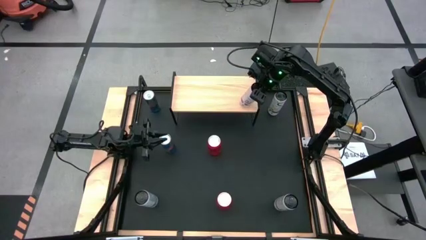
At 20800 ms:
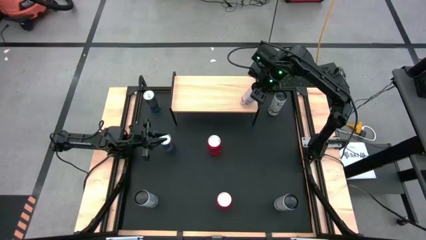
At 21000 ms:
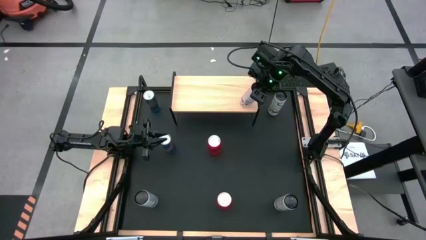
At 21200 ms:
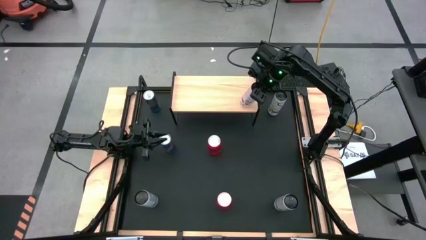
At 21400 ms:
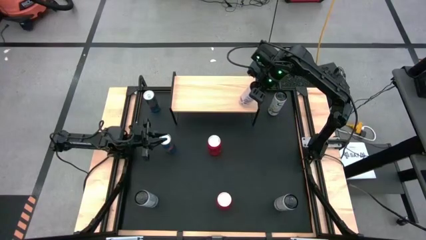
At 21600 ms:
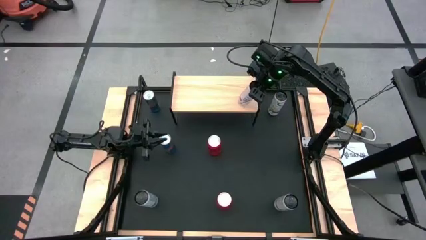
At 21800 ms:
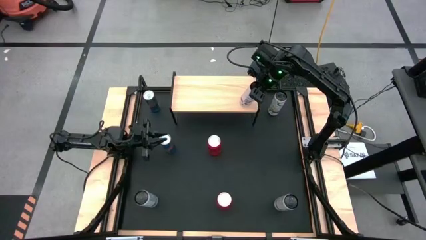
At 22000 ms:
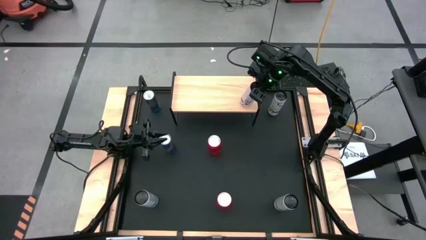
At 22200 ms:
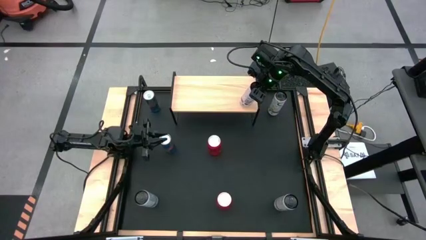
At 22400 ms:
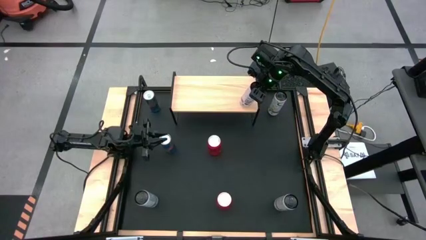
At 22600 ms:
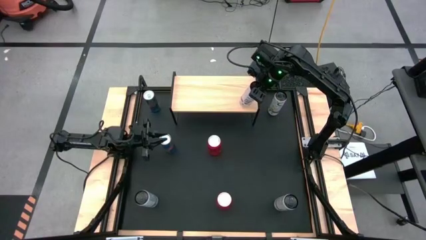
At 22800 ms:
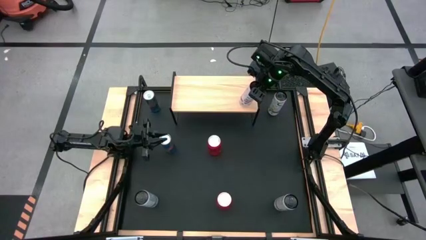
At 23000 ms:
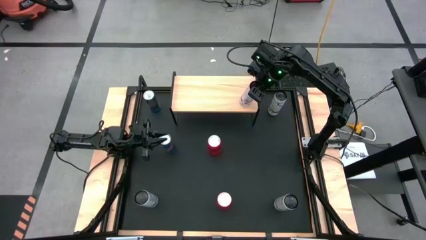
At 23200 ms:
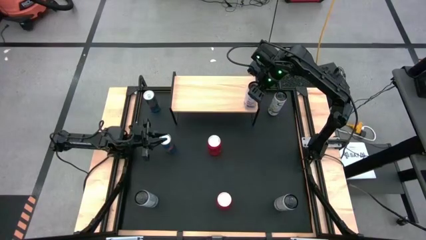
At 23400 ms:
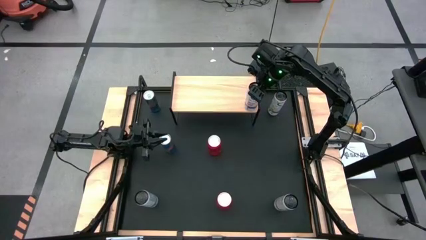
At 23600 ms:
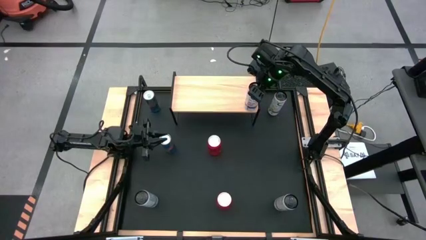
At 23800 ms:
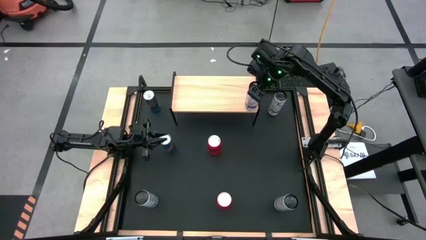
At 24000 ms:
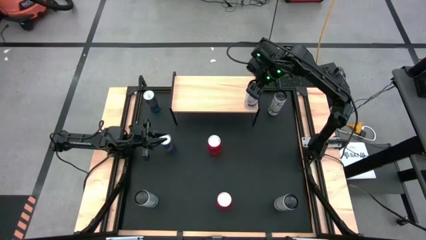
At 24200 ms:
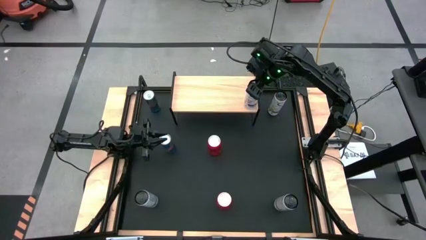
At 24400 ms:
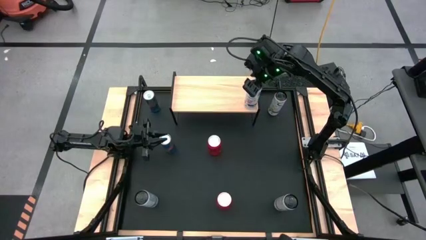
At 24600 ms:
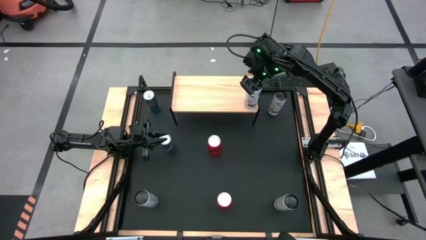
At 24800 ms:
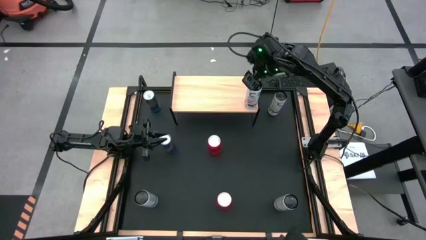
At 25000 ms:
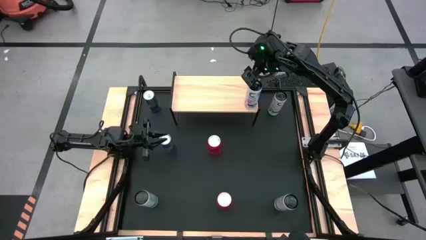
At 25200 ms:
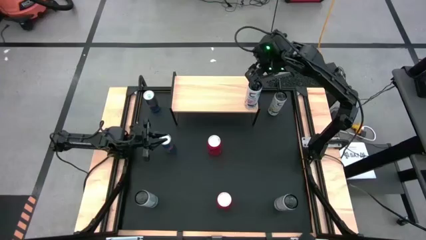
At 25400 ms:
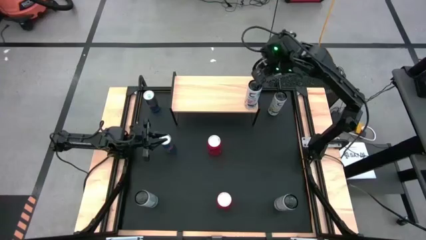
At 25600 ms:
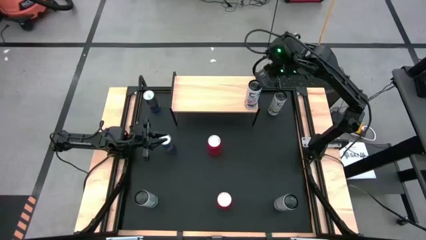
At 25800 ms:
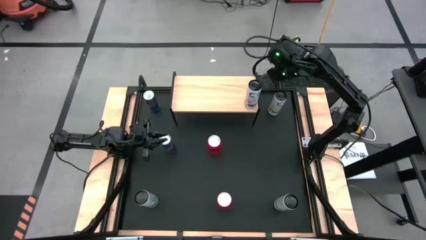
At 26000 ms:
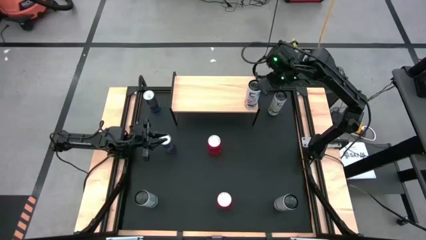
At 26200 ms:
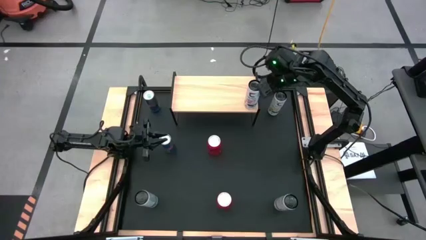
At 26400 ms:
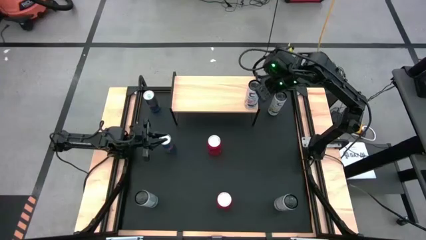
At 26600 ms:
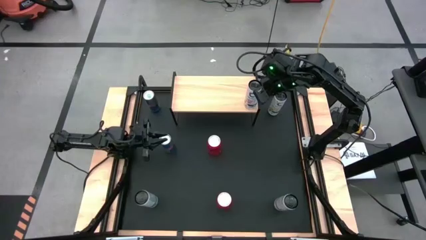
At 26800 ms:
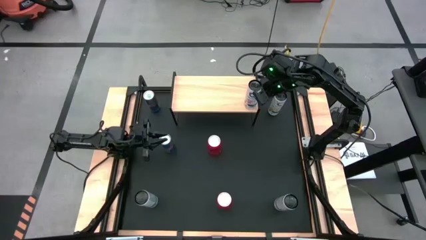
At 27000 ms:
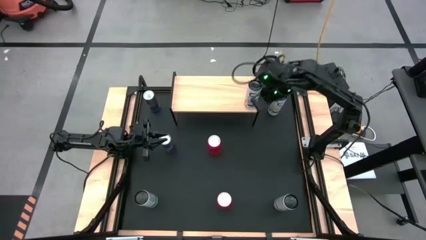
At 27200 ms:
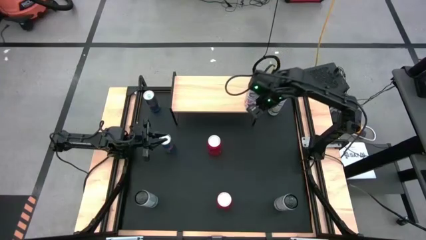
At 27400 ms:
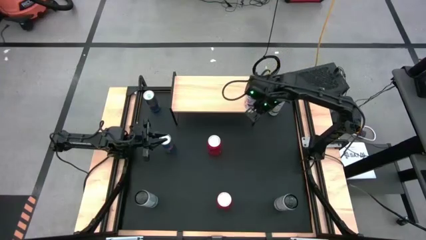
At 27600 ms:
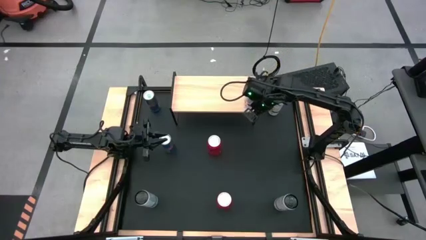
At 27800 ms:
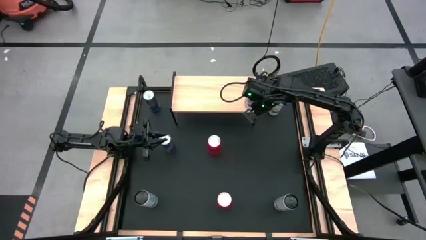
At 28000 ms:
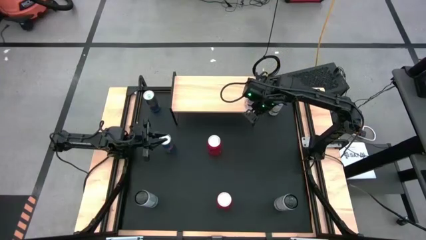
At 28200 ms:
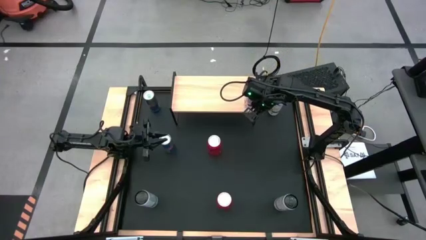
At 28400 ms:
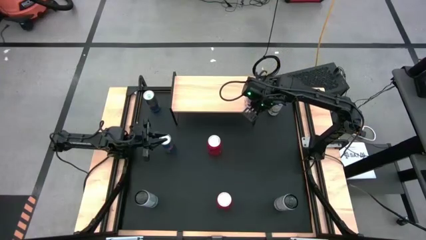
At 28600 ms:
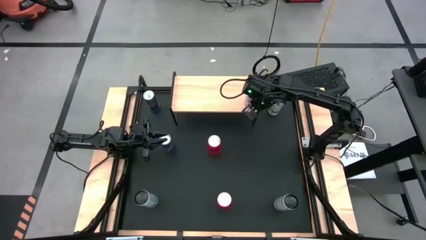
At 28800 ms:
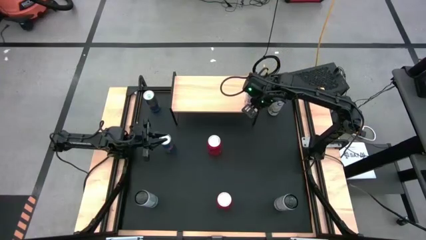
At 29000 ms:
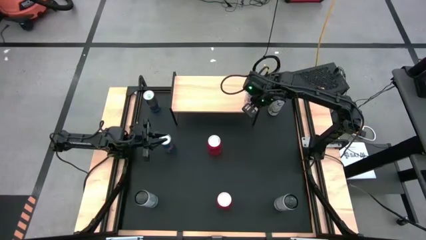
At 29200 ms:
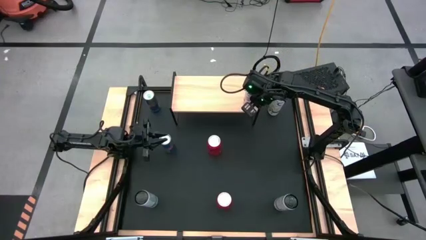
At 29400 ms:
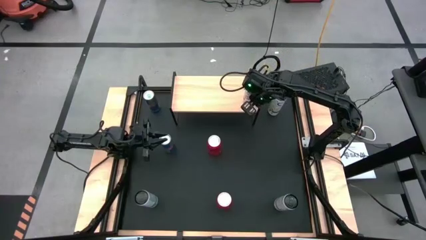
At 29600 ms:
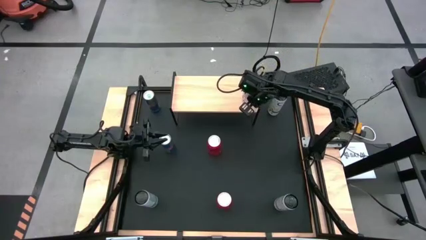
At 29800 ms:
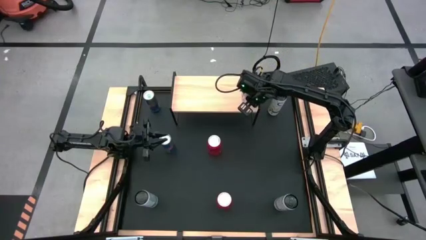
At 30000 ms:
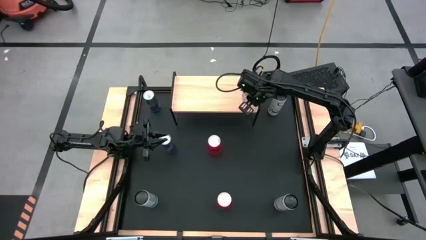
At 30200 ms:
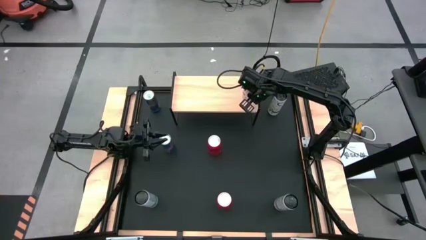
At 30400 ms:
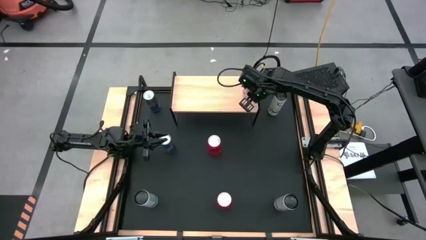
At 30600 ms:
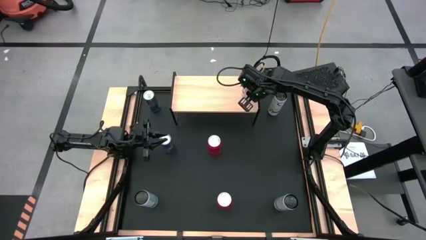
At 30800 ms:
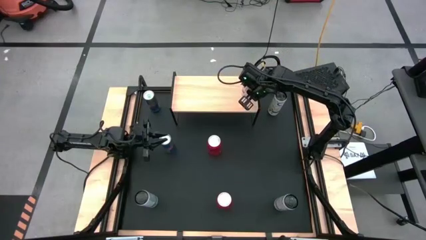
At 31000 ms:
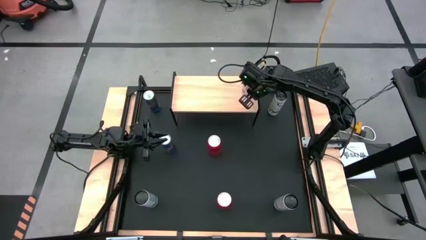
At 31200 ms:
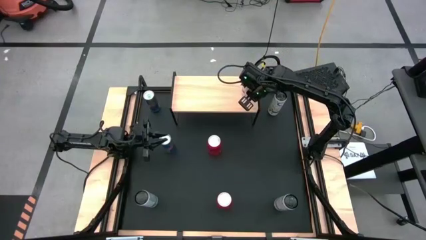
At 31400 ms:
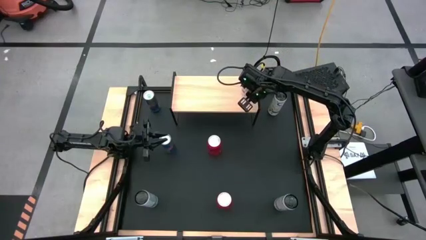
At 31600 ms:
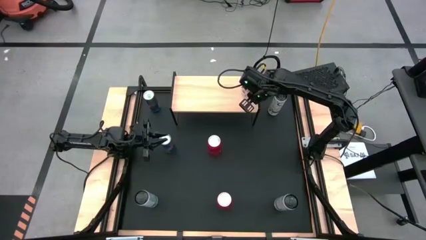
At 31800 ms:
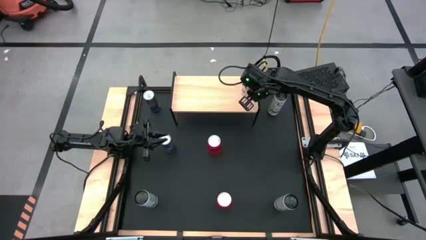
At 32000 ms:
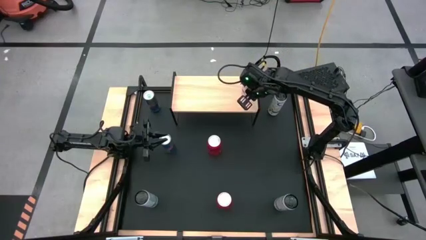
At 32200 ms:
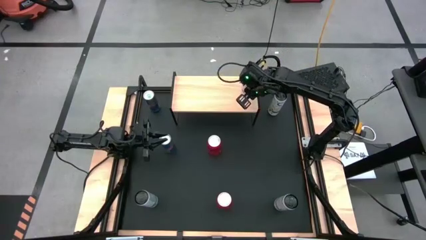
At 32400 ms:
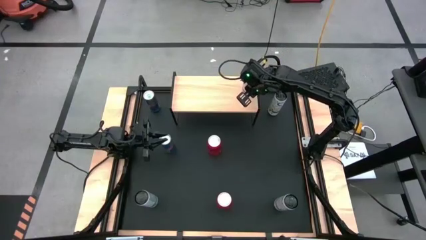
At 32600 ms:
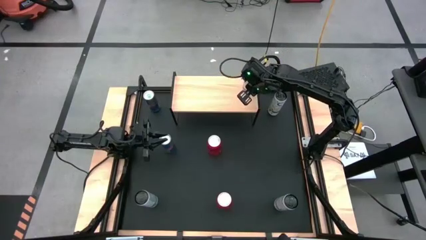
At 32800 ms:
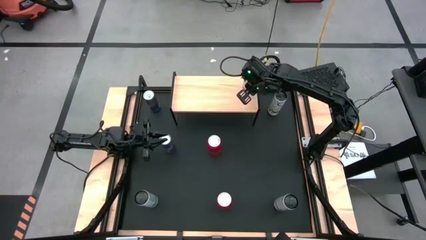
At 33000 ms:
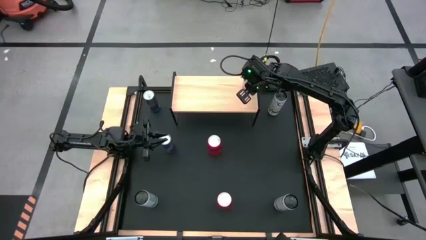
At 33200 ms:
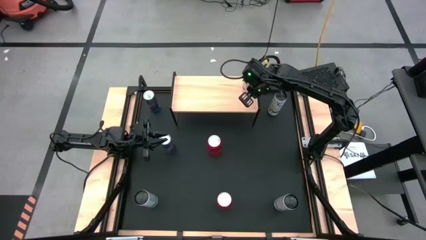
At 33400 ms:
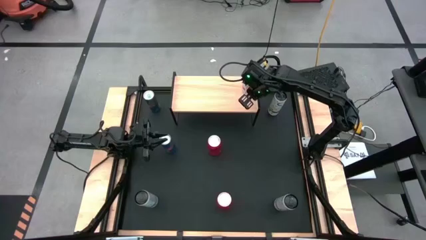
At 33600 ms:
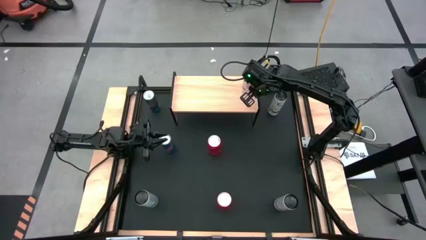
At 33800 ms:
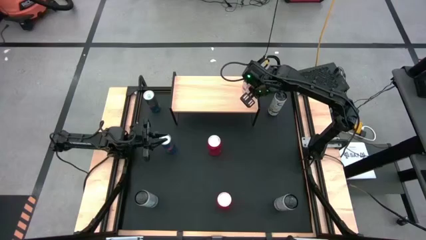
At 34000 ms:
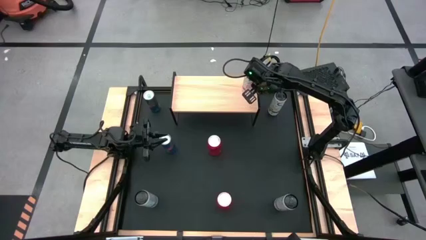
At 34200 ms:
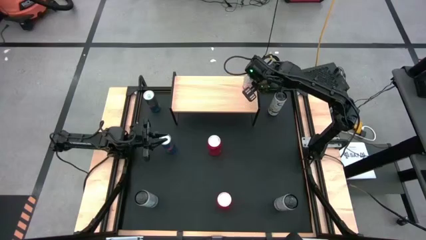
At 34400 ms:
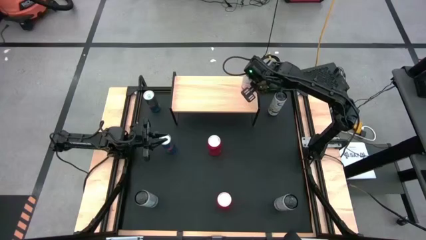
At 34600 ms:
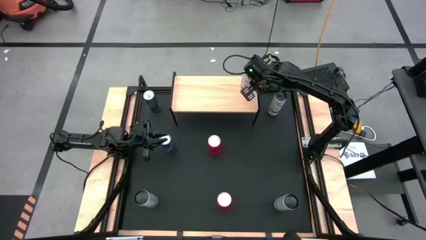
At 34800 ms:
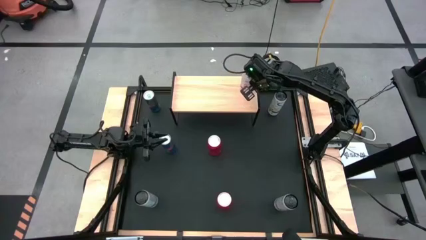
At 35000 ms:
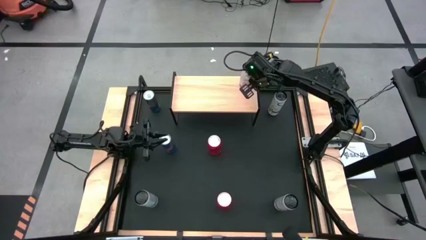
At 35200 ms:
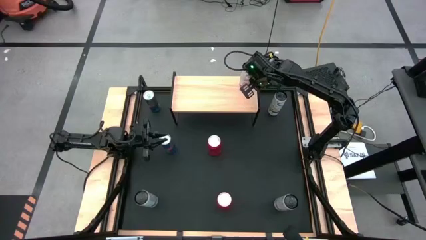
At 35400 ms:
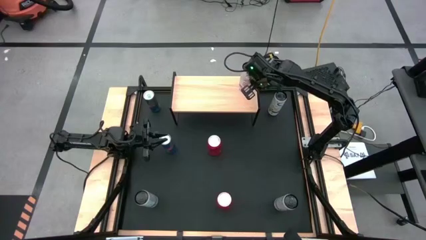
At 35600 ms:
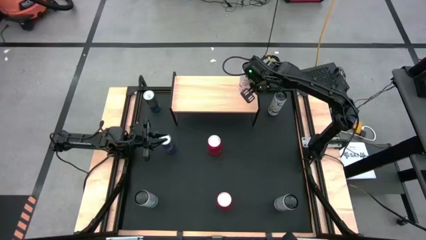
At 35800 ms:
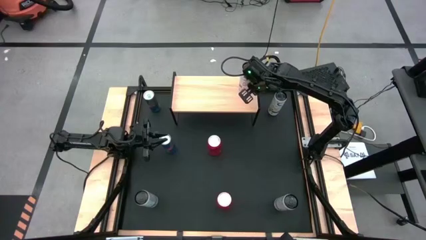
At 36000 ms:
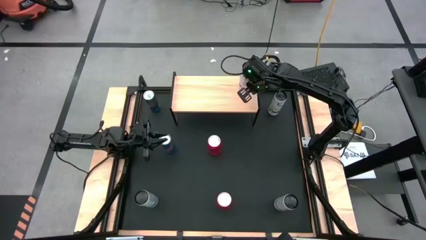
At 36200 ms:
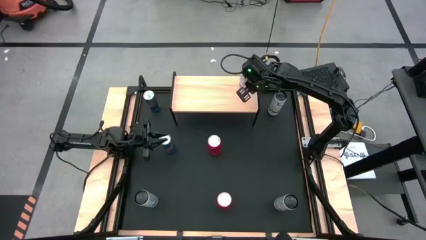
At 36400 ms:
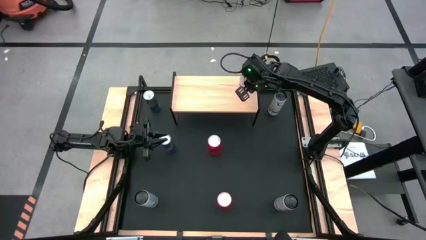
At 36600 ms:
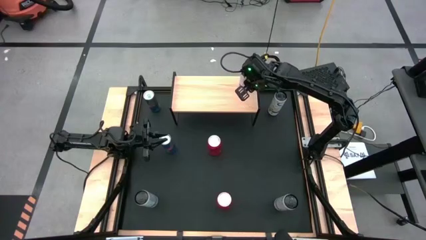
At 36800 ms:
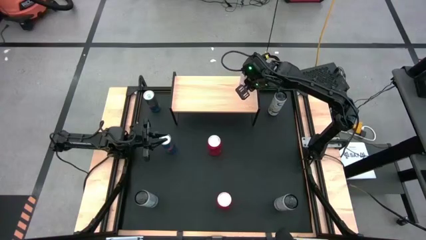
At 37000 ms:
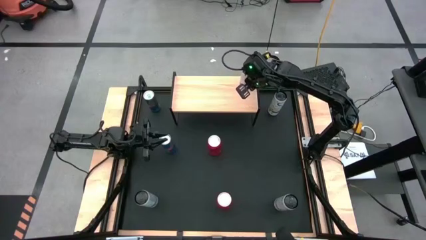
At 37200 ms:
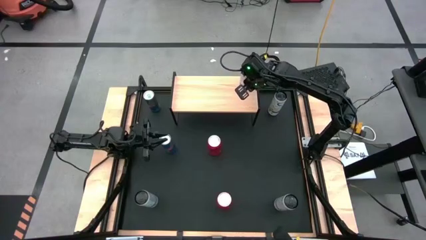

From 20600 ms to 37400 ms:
Task: Place canned beverage on shelf
Put the top white pink soda can on the shelf
